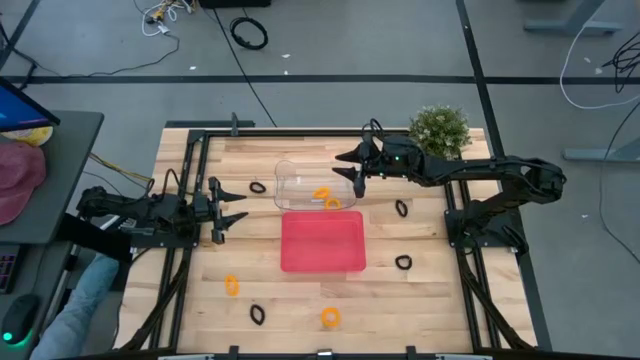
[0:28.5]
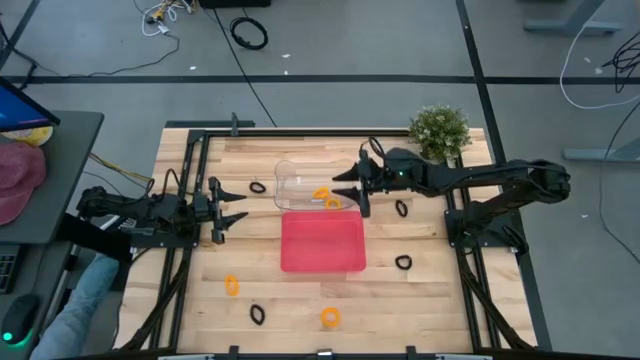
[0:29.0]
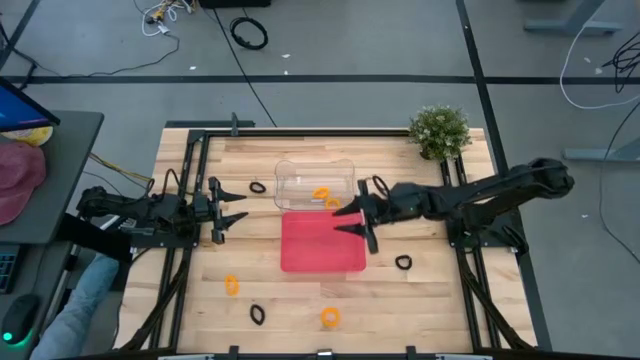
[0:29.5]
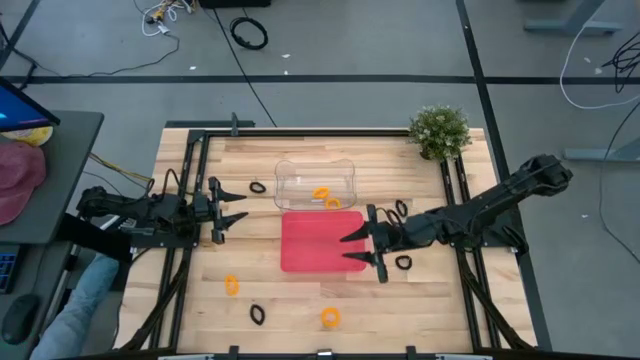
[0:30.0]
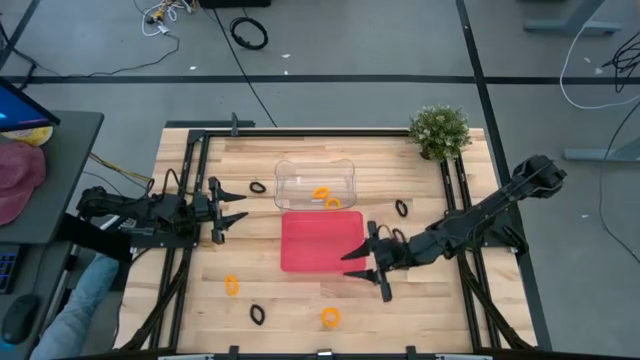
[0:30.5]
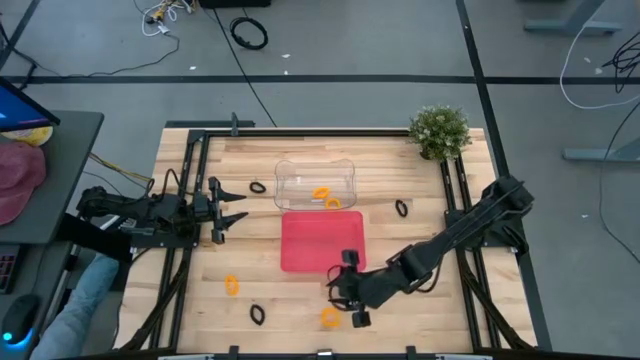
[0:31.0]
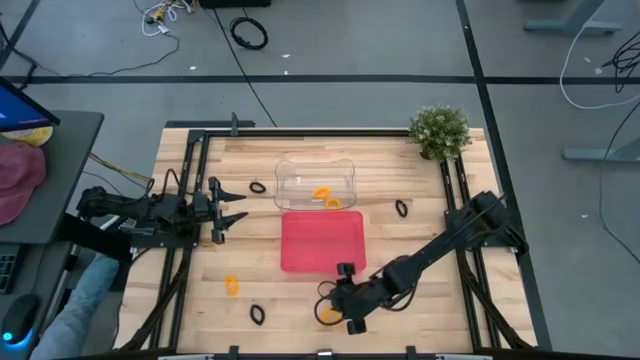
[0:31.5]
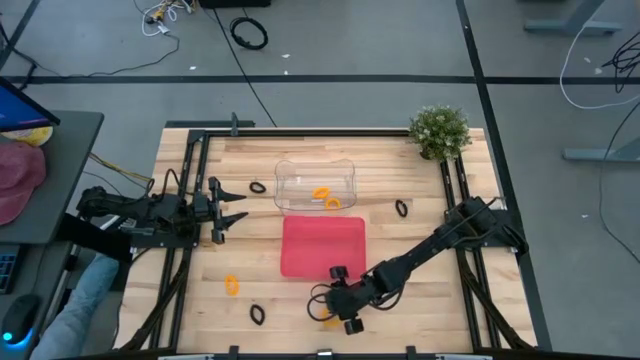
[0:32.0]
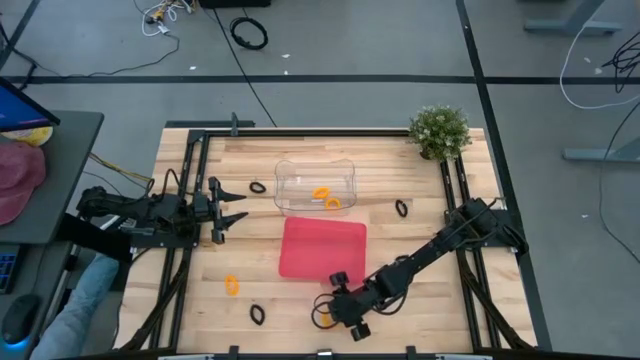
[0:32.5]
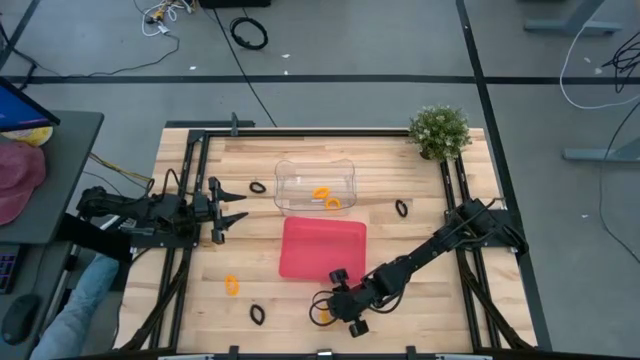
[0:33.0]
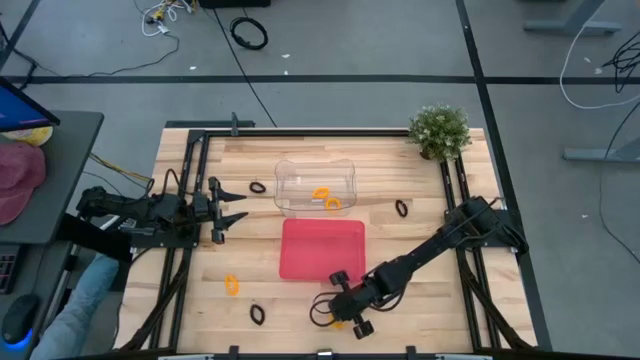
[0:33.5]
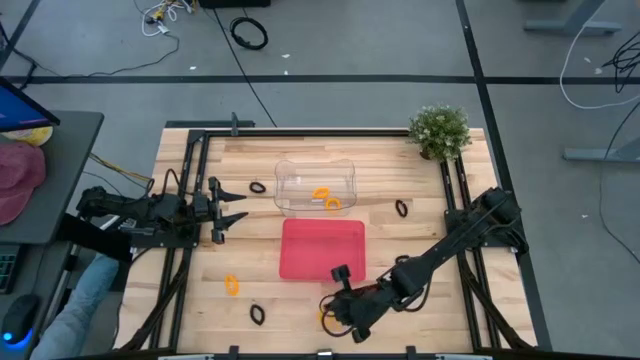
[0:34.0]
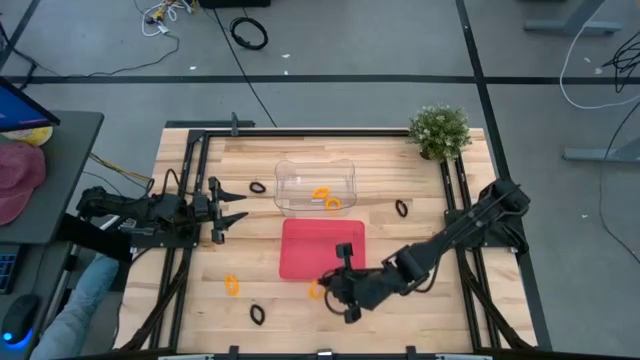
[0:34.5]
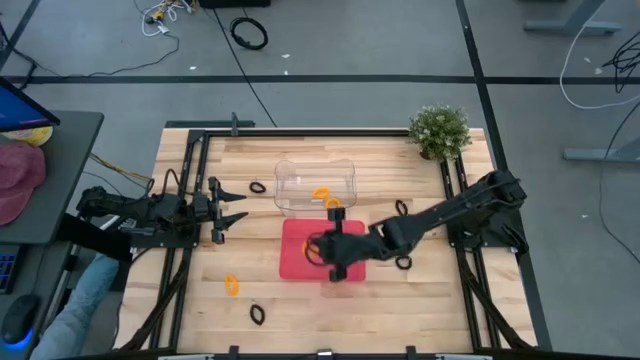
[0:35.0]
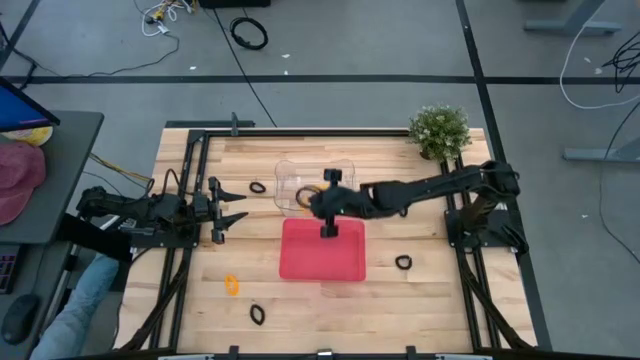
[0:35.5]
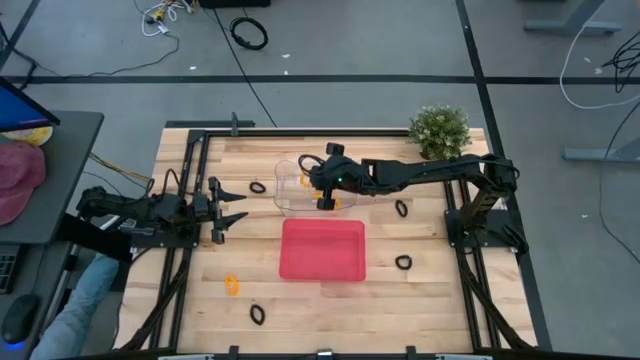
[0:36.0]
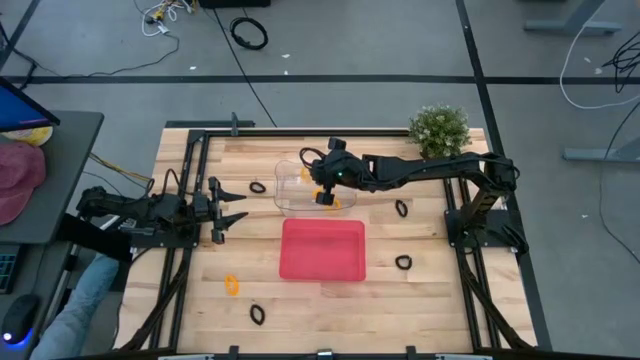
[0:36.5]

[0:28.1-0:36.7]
Task: Sort spring keychains
Put the yellow spring keychain into the transparent bin

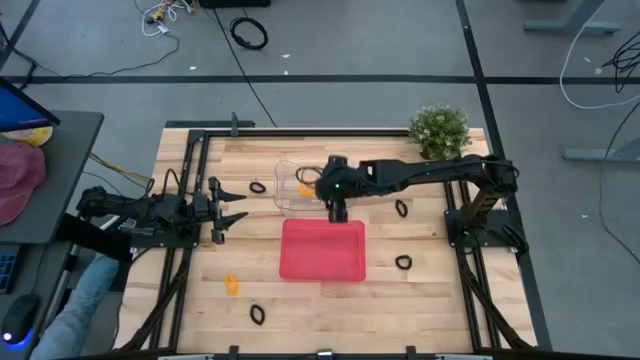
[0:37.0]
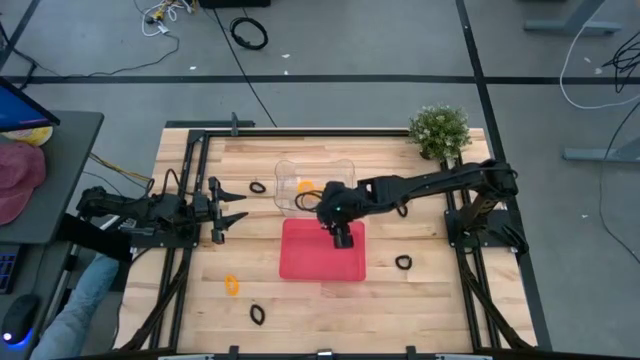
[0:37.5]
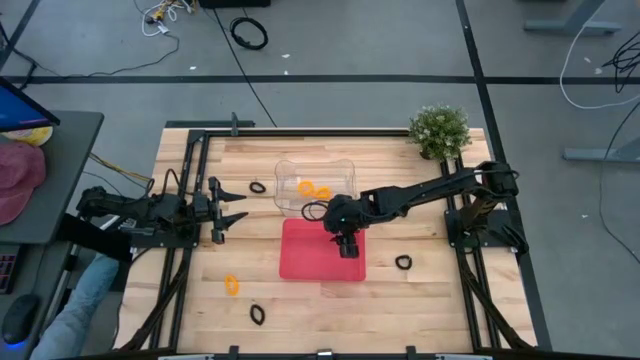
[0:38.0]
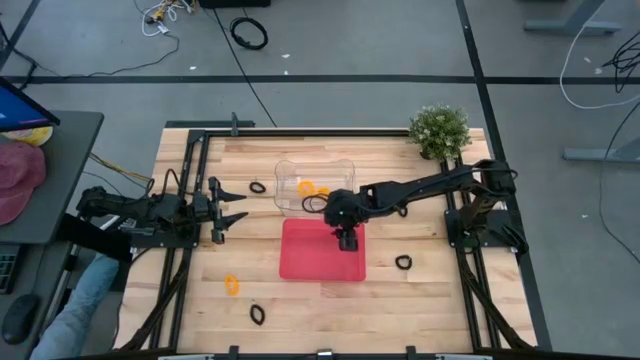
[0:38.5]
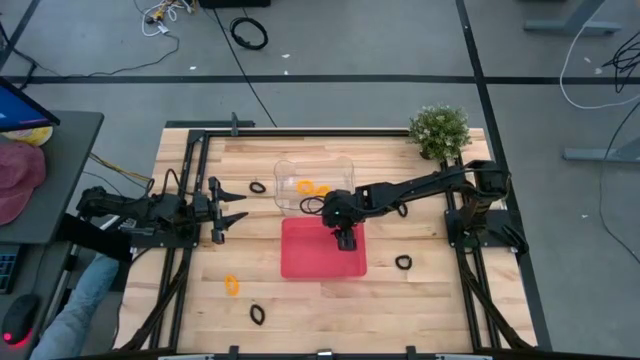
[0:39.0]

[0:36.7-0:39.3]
Adjust the red bin

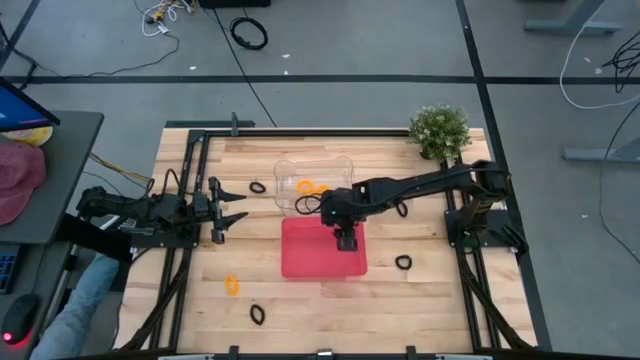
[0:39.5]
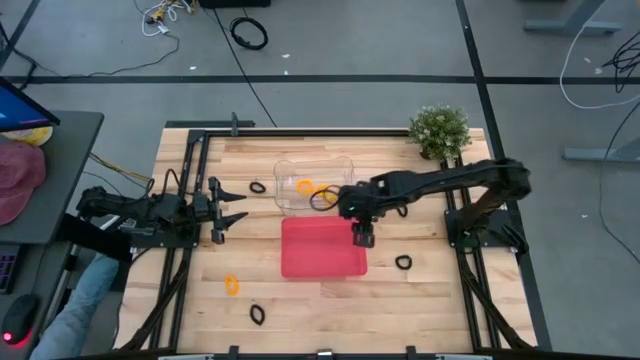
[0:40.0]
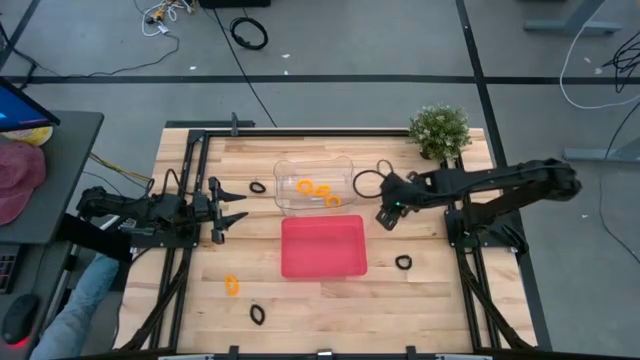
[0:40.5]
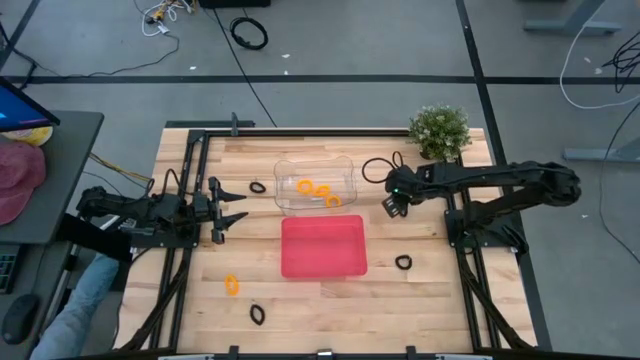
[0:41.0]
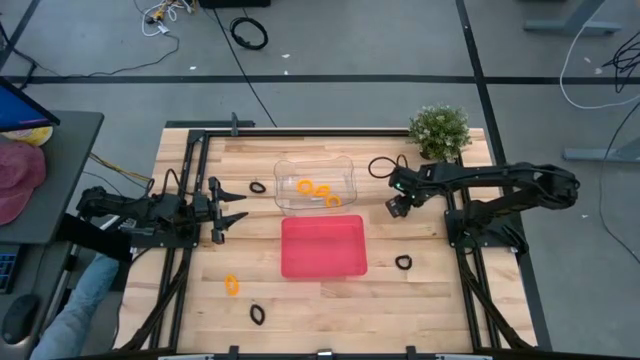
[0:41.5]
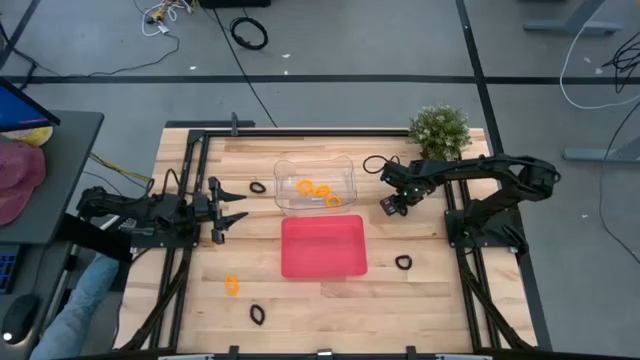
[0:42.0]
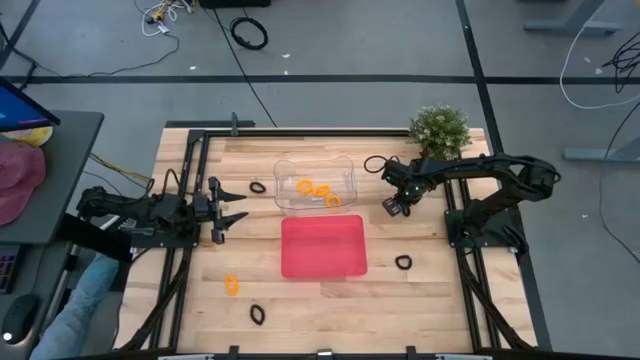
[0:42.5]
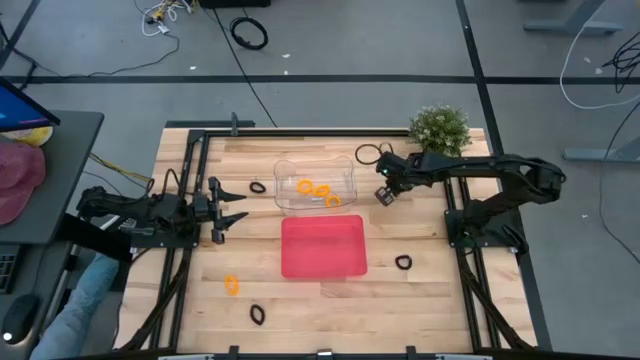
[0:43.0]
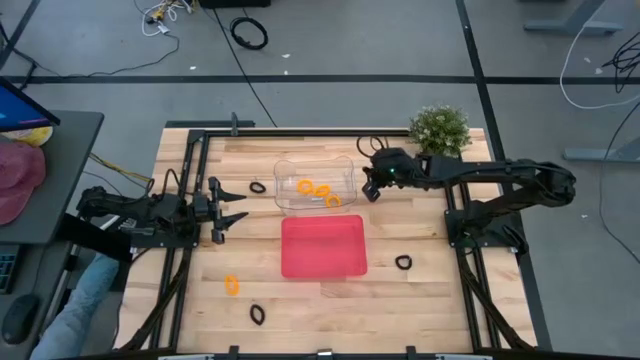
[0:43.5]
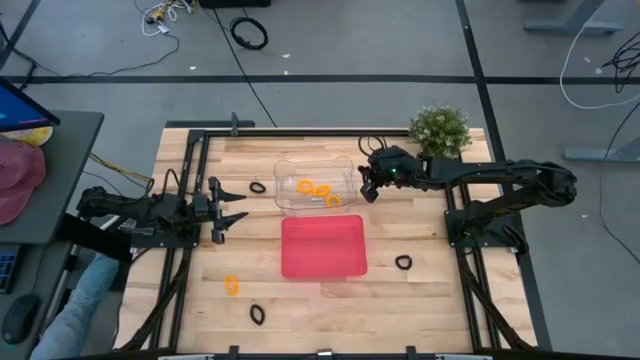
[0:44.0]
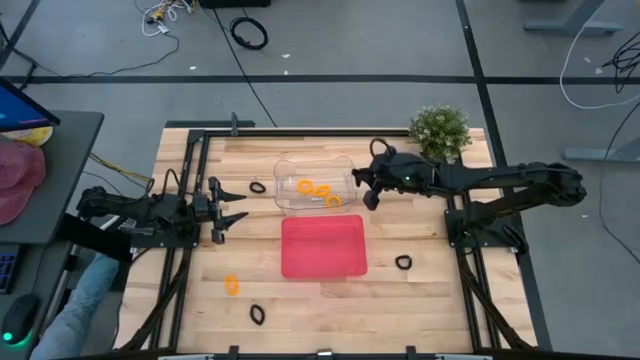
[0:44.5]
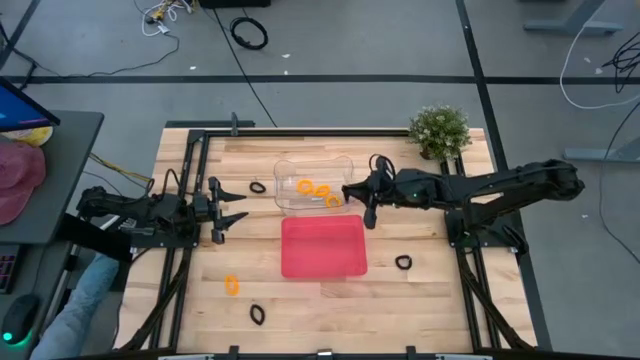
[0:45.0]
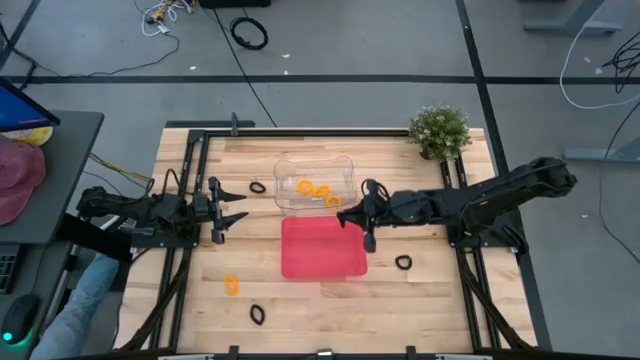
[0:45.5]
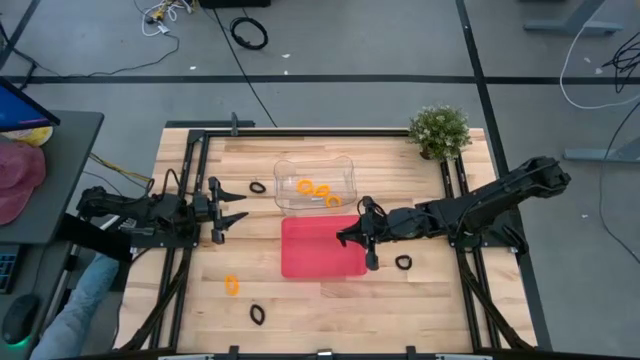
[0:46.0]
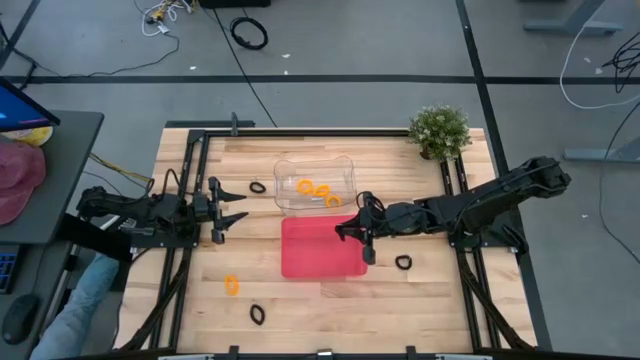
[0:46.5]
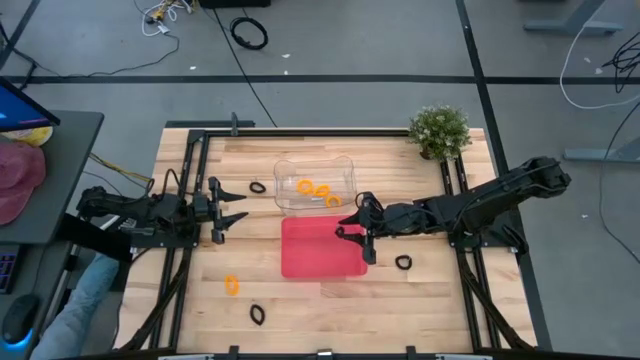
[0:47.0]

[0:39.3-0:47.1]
Put the black spring keychain into the transparent bin

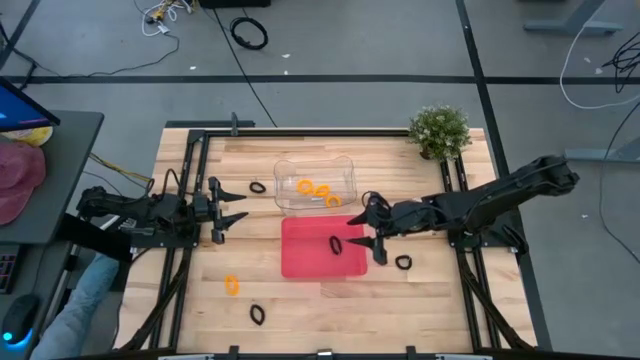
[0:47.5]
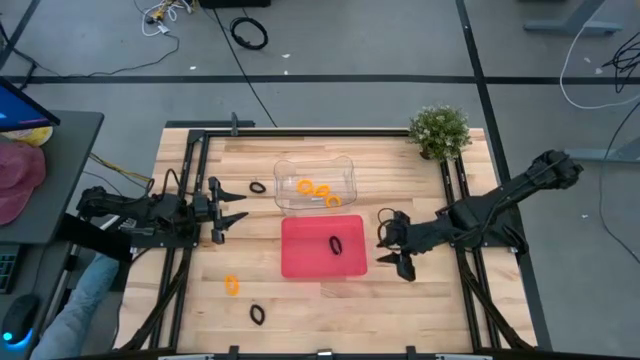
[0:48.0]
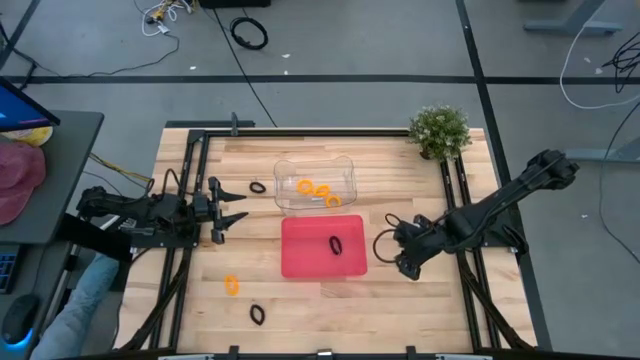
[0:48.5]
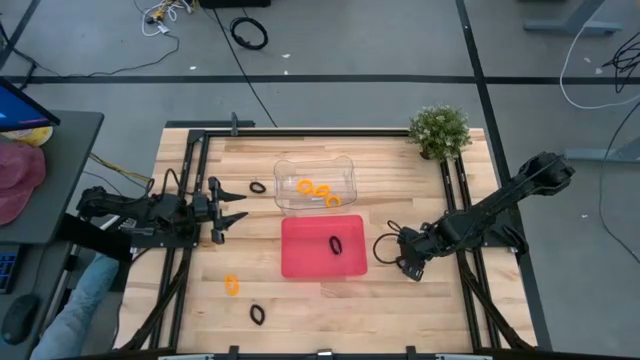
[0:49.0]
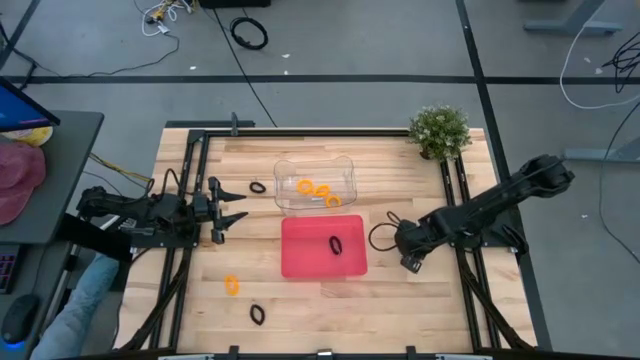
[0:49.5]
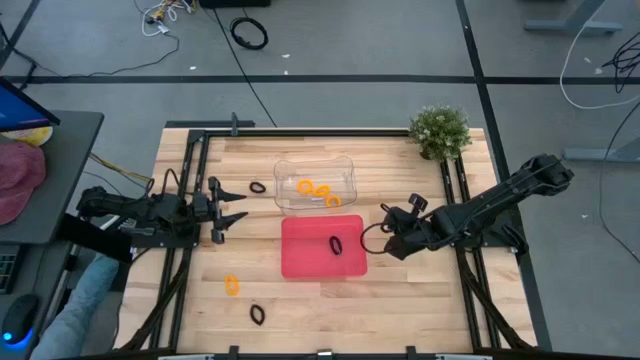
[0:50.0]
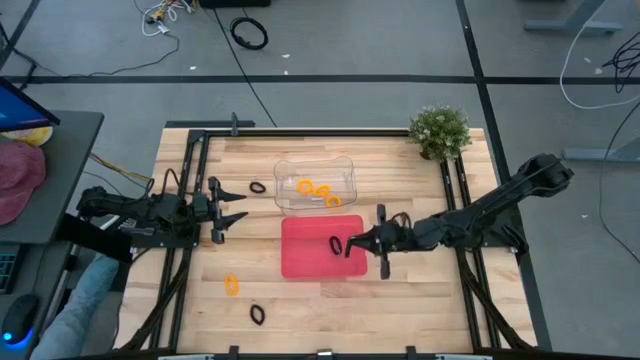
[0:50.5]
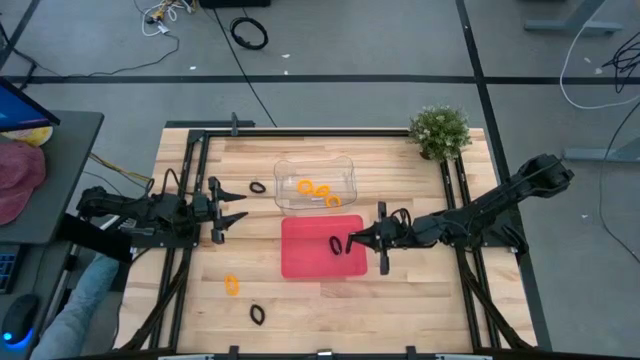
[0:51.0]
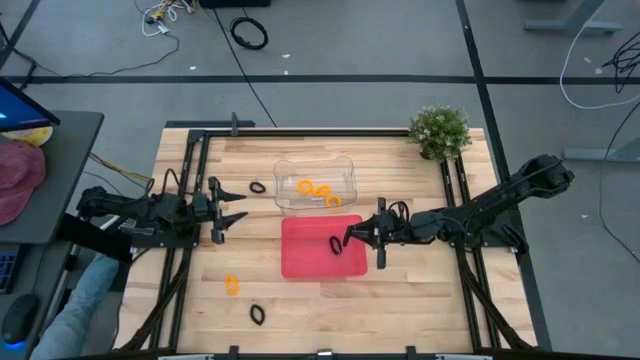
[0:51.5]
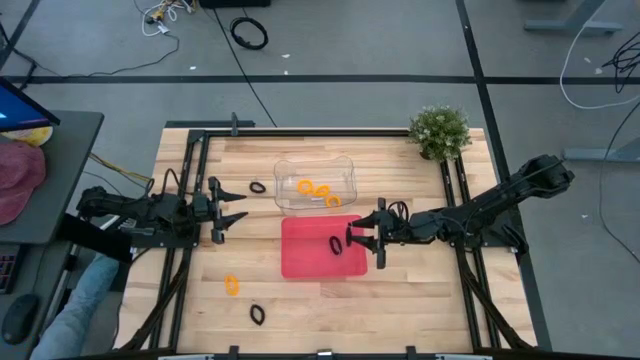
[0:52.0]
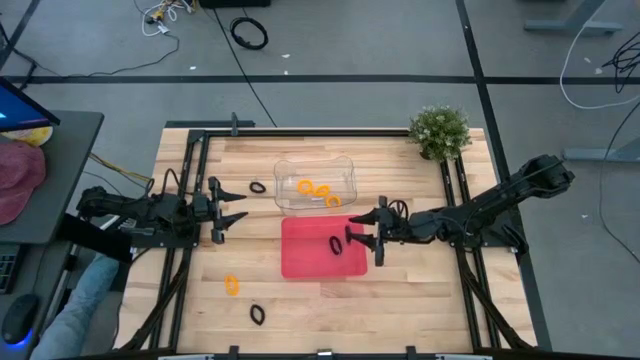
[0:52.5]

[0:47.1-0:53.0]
Put the black spring keychain into the transparent bin
